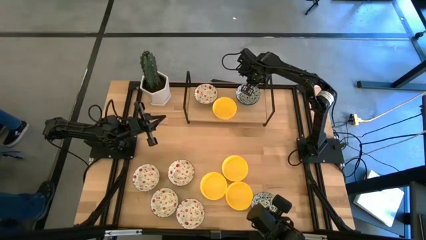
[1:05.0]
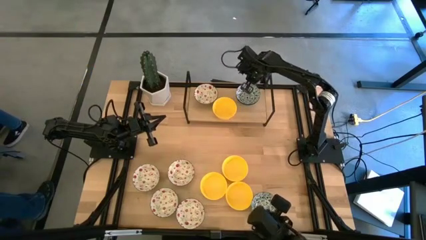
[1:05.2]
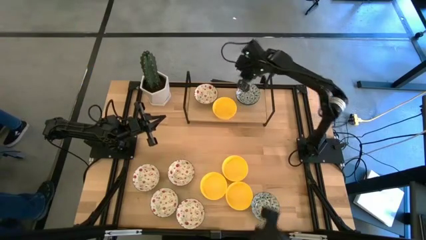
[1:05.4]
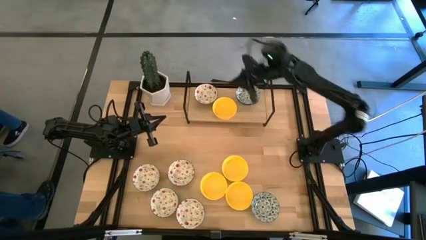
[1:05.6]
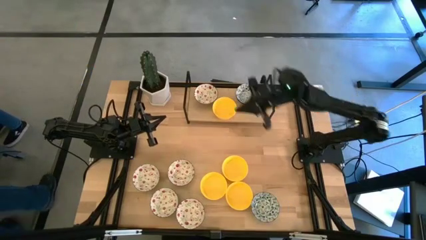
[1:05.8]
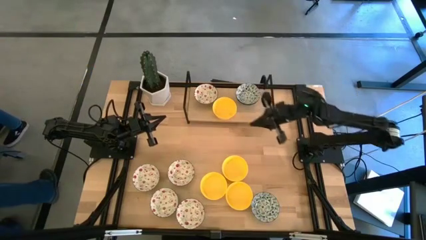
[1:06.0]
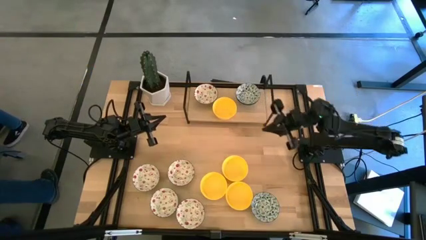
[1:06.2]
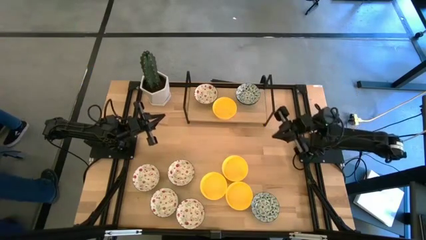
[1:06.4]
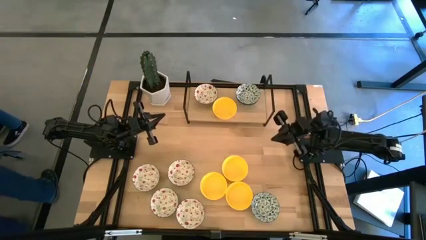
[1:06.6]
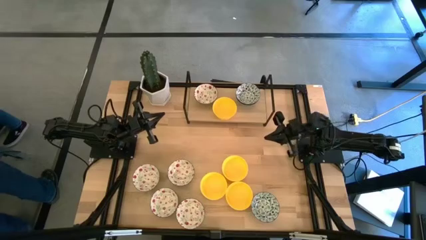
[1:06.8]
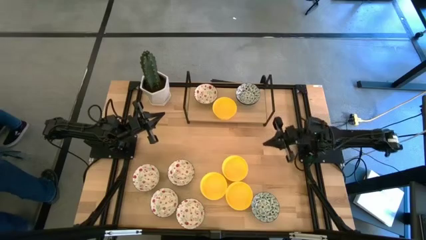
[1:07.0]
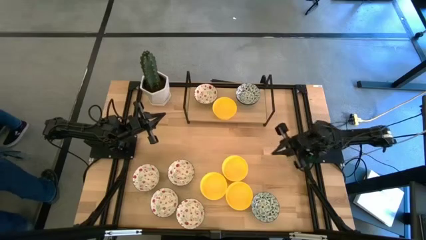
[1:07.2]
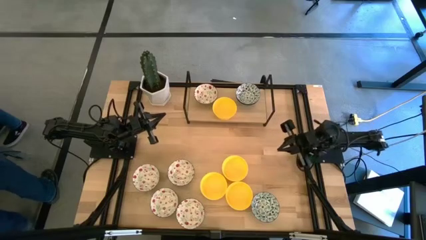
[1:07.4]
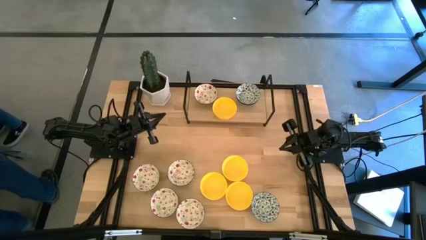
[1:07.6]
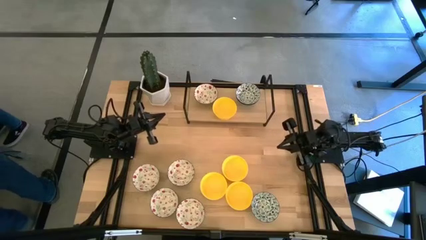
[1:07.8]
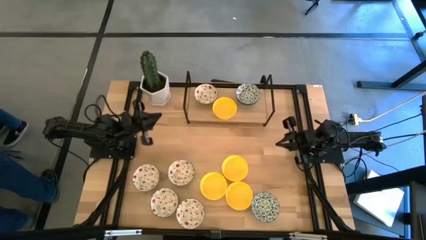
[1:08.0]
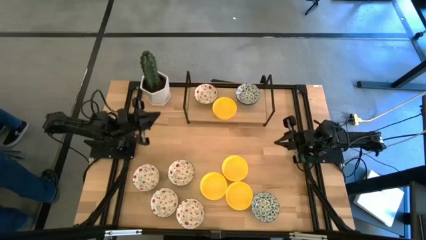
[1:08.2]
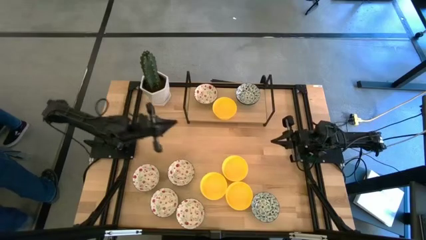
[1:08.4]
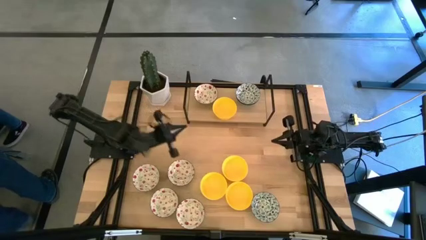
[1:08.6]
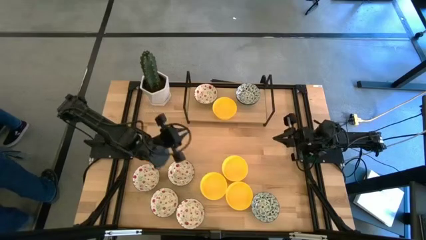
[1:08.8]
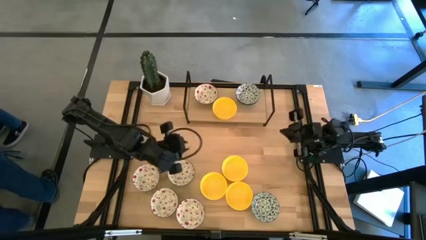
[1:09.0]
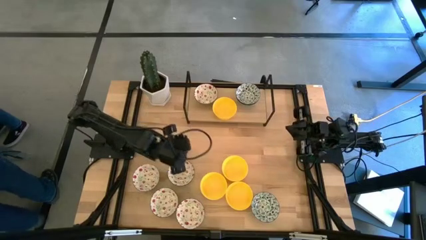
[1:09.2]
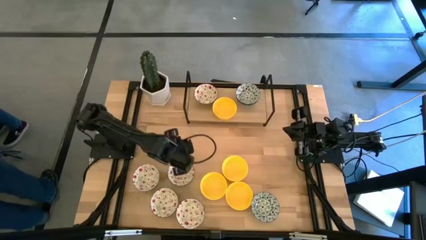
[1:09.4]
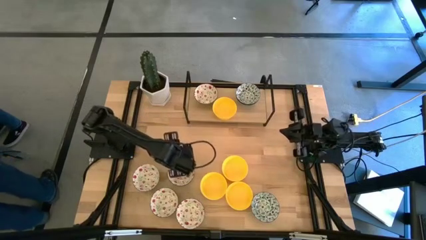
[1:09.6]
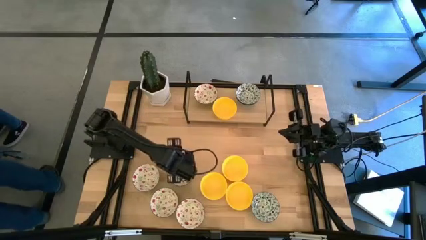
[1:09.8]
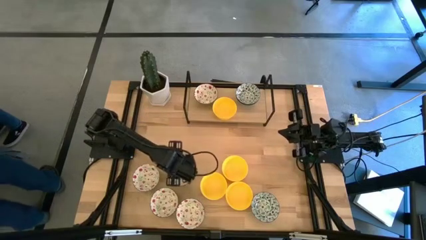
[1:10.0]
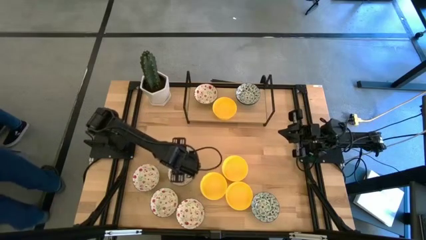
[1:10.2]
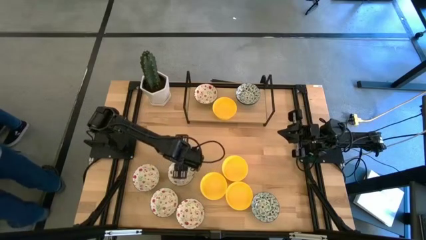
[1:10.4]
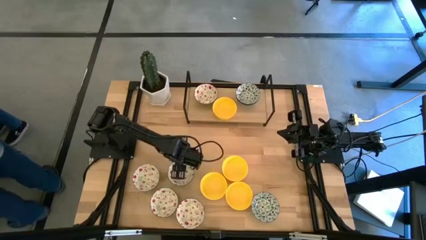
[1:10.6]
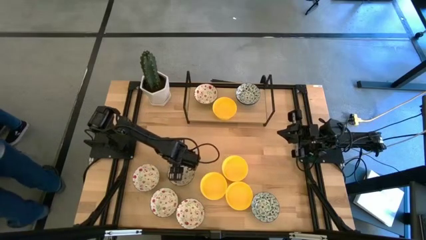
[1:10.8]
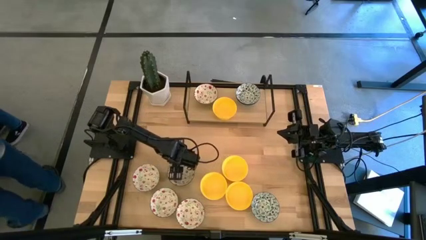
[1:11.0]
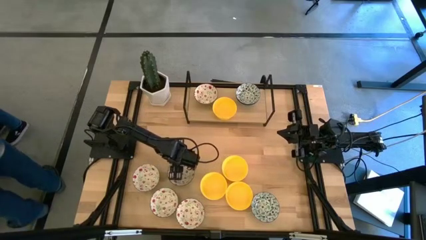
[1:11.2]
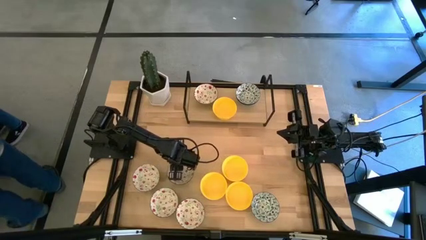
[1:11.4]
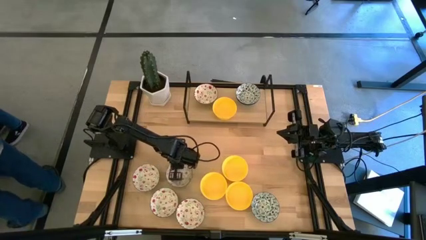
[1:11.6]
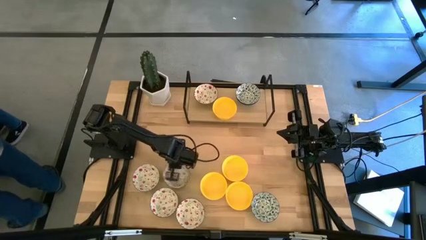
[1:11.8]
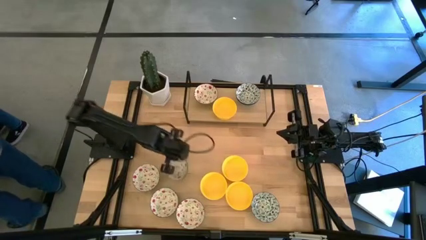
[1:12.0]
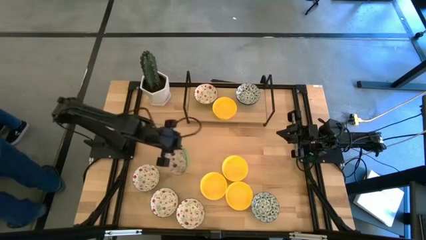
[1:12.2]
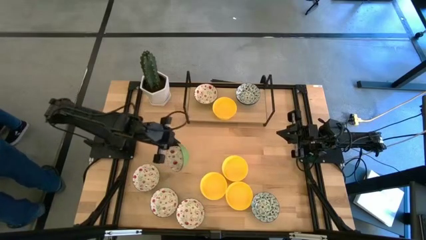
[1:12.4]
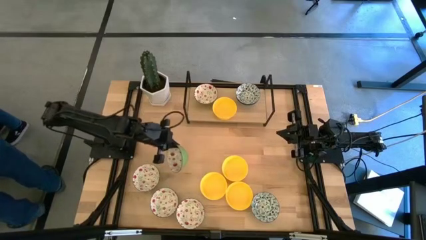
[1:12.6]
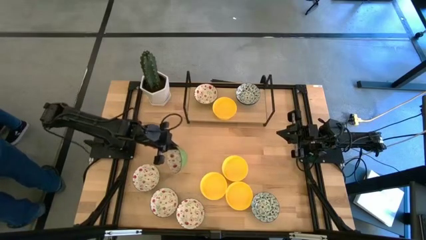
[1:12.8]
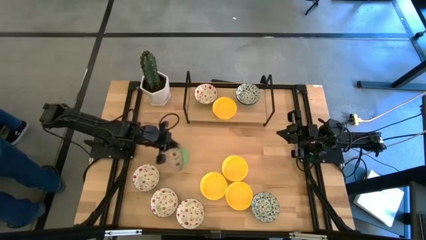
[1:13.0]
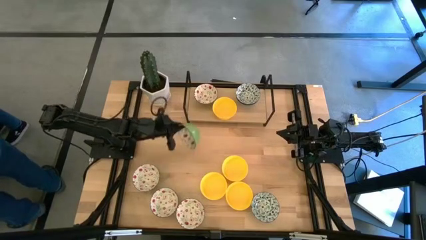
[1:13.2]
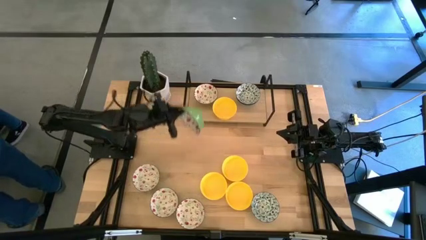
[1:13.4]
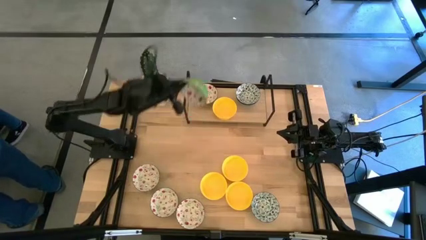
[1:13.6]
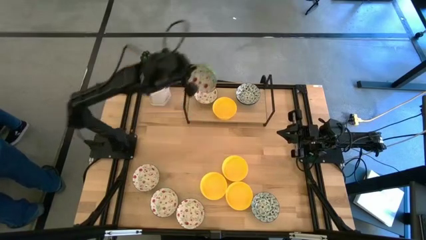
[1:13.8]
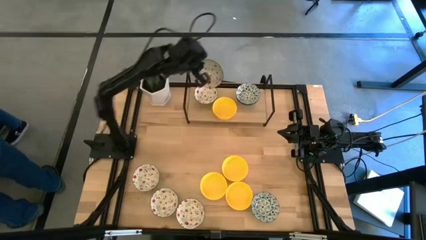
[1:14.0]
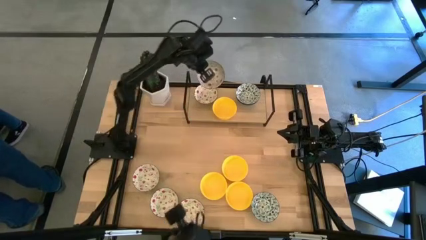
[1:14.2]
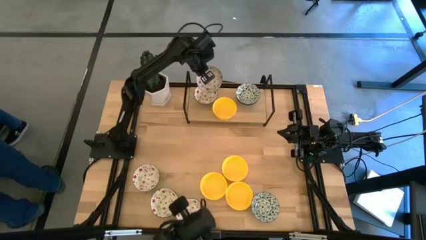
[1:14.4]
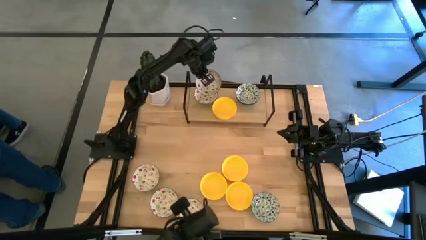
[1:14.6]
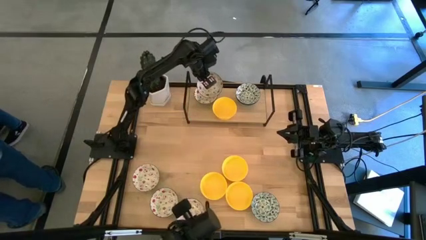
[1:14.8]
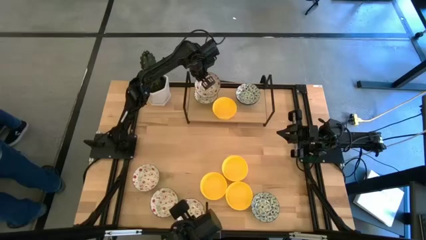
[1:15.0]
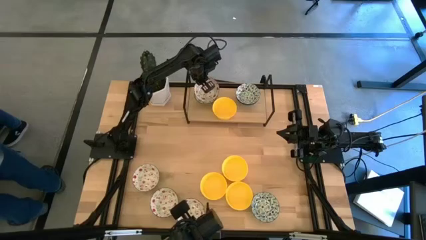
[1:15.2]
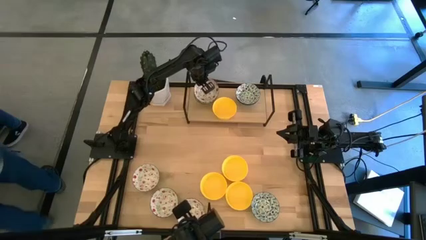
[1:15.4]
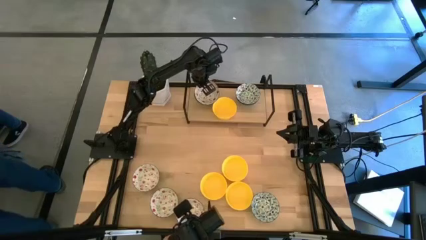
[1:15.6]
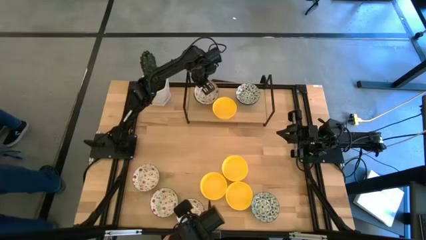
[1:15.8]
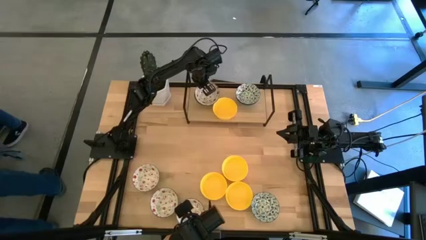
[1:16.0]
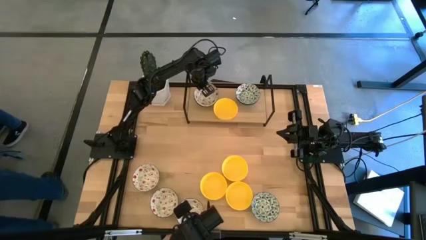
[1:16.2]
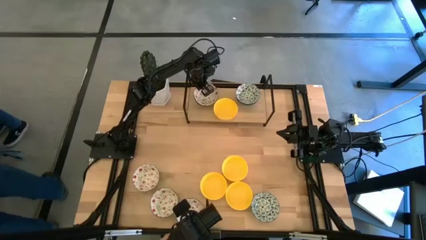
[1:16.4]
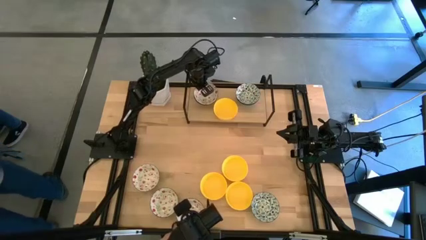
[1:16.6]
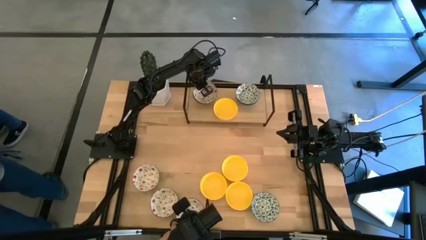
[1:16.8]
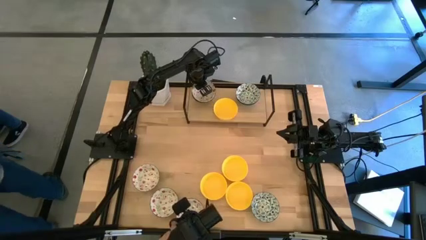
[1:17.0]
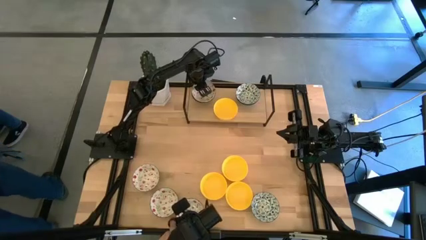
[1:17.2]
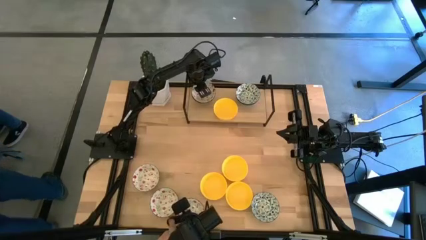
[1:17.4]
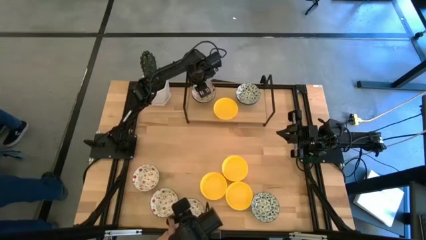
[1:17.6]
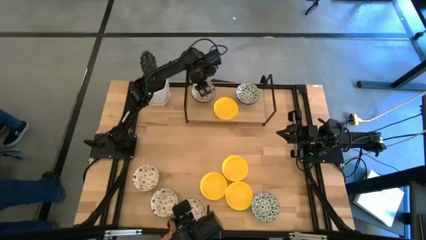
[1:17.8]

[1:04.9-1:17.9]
Task: Pick & Place Mini bowls
Stack the top right green bowl on top of the green bowl on the shelf

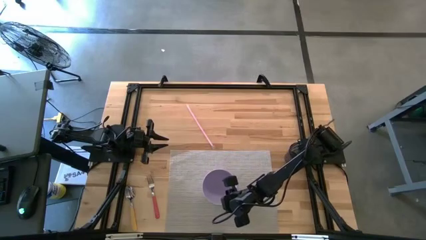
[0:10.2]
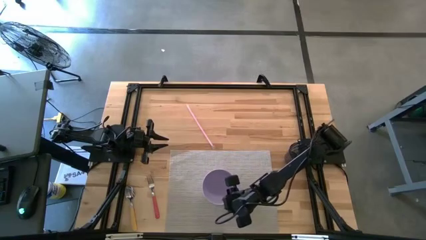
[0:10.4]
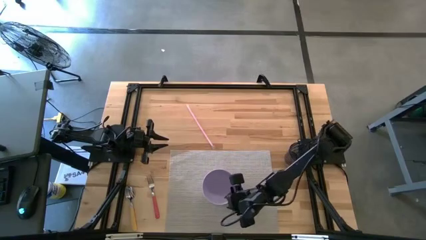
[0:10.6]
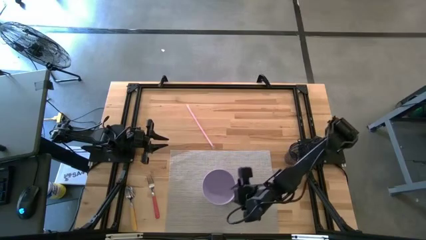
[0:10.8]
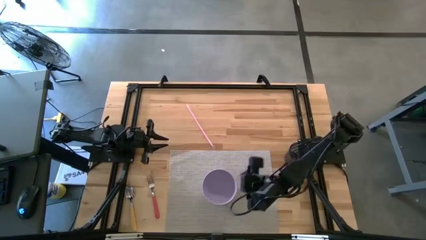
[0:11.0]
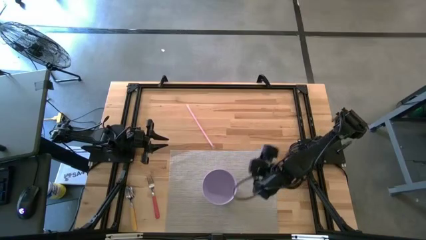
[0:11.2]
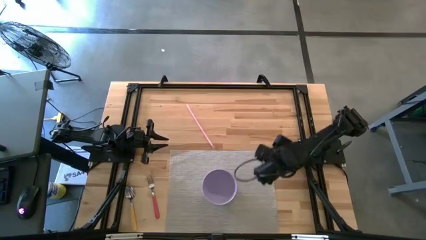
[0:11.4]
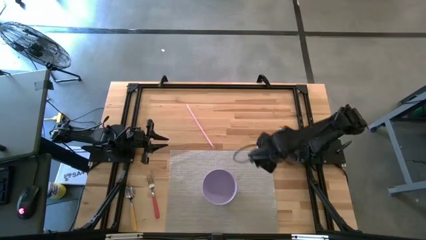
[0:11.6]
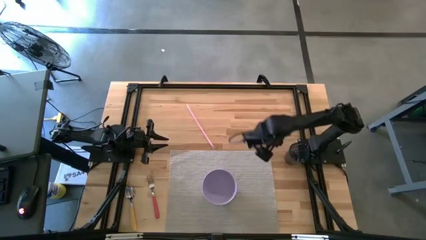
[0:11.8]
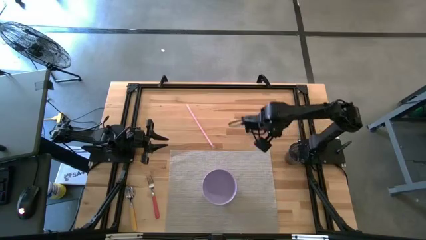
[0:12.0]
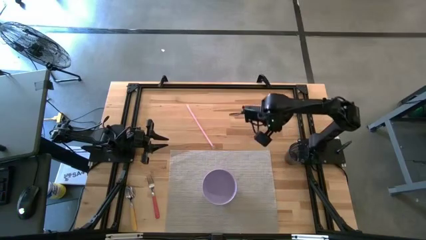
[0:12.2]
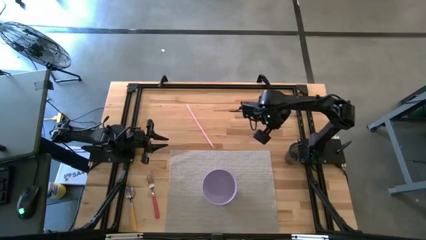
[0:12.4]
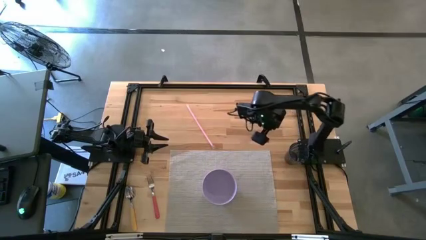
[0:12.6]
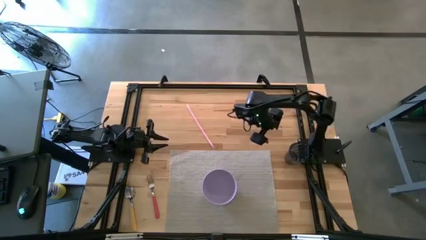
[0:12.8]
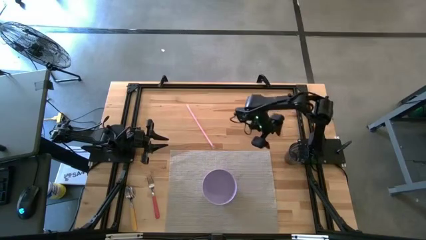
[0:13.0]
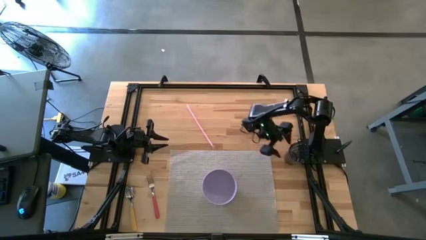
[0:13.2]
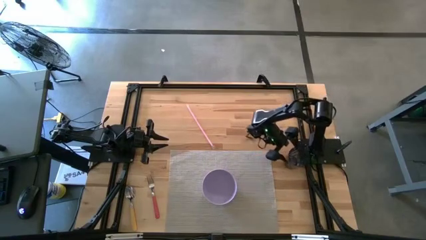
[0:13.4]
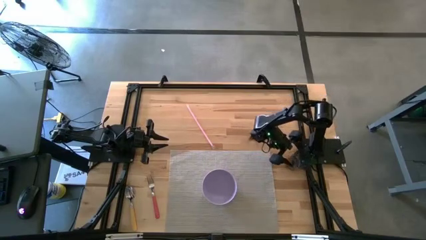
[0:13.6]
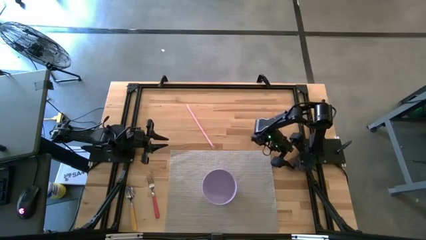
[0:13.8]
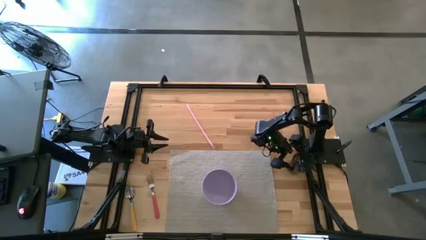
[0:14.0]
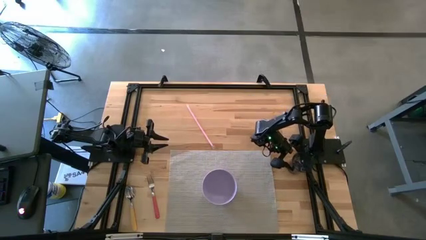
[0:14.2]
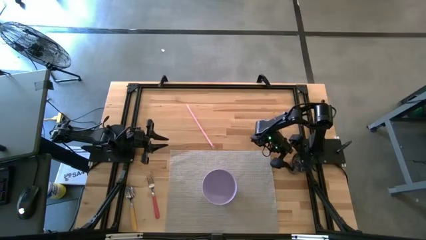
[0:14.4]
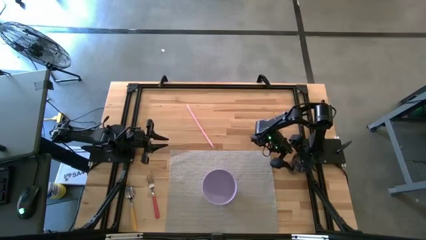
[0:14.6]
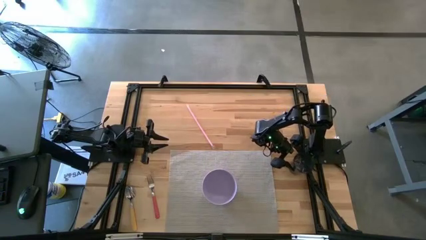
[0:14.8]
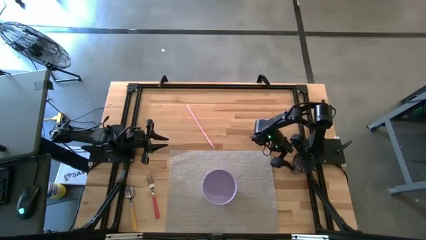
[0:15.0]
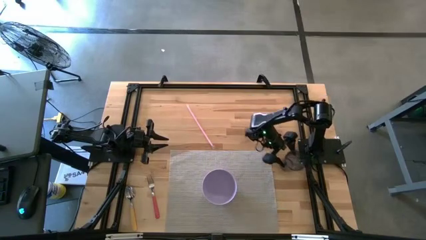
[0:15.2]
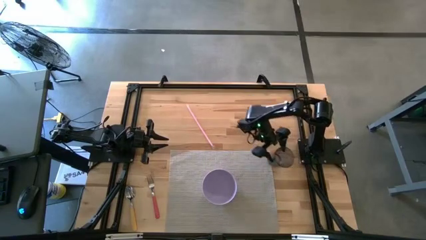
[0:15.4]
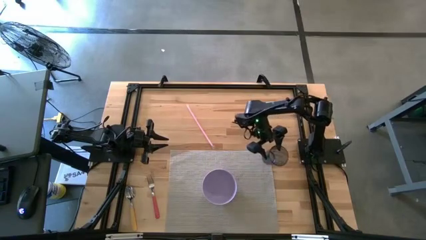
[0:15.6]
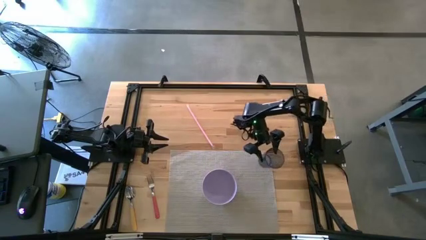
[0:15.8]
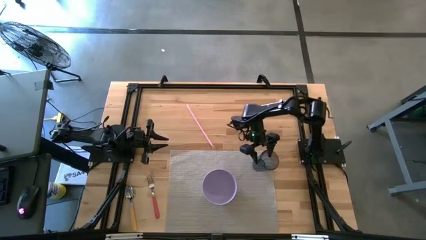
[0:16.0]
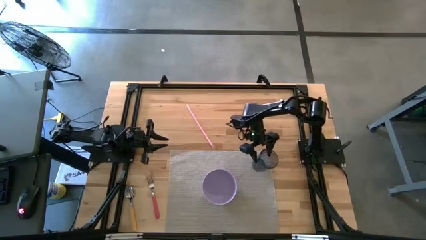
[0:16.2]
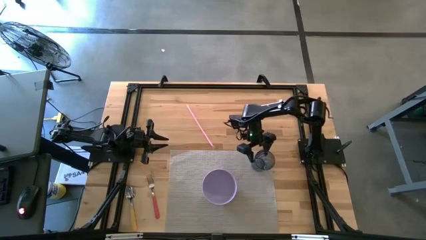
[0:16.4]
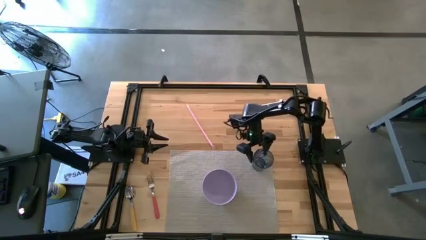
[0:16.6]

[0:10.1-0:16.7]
Task: Pick & Place Utensil
Put the blue cup on the gray mat to the top right of the purple bowl
